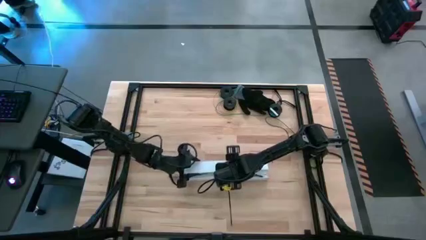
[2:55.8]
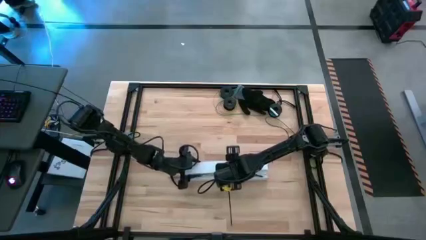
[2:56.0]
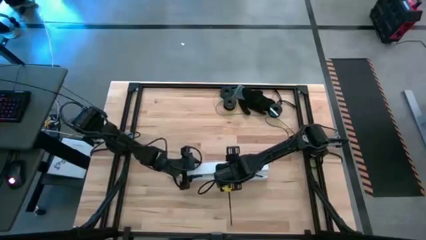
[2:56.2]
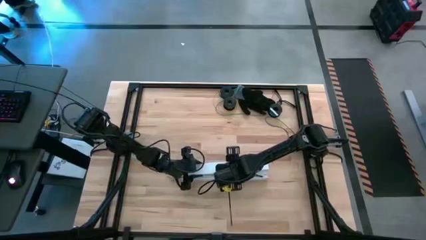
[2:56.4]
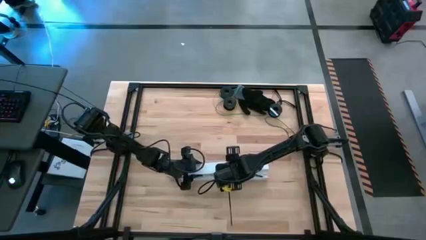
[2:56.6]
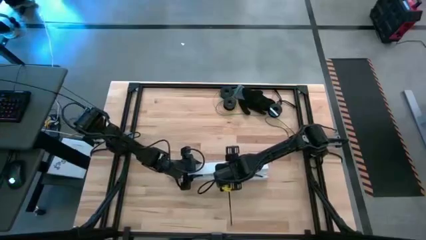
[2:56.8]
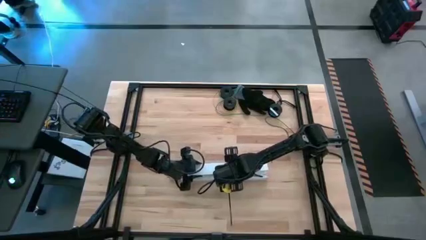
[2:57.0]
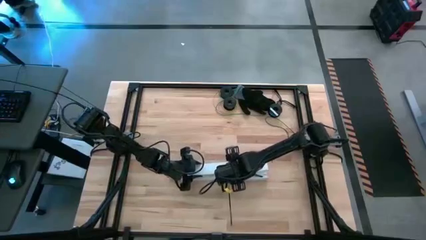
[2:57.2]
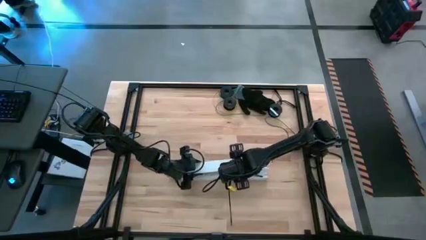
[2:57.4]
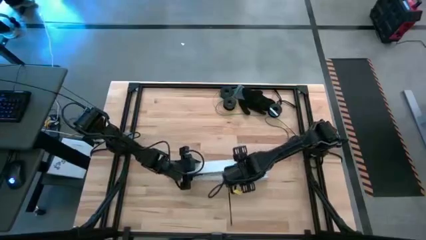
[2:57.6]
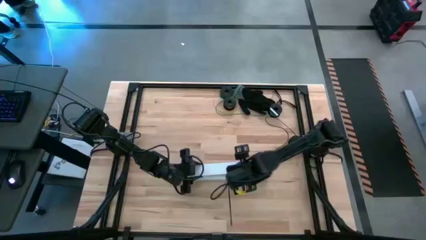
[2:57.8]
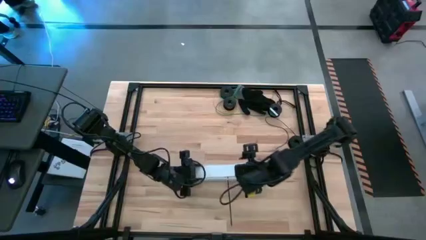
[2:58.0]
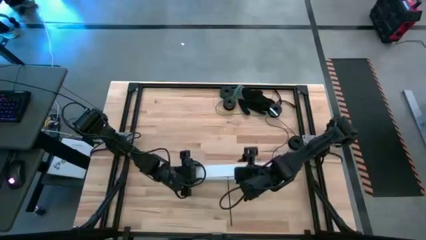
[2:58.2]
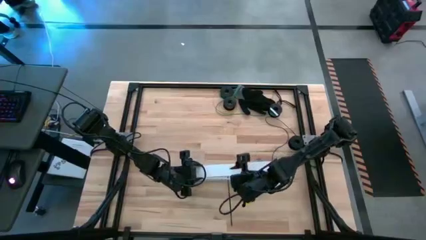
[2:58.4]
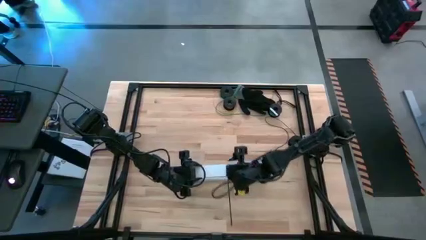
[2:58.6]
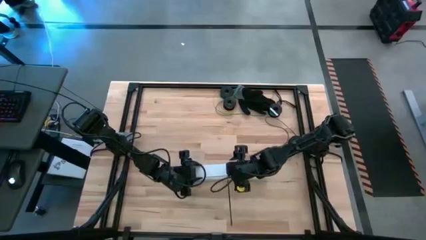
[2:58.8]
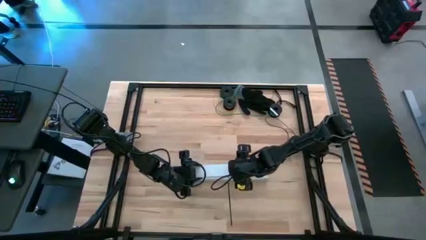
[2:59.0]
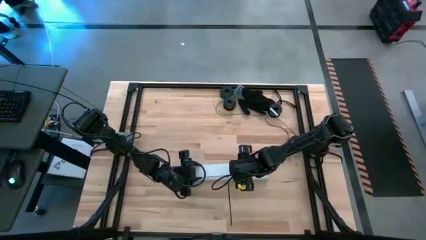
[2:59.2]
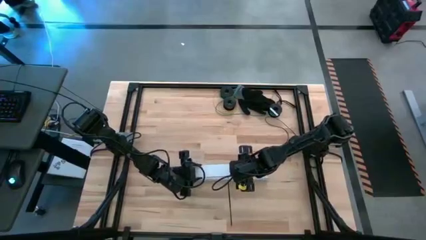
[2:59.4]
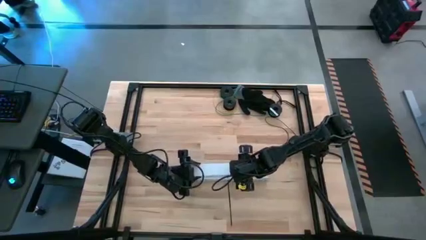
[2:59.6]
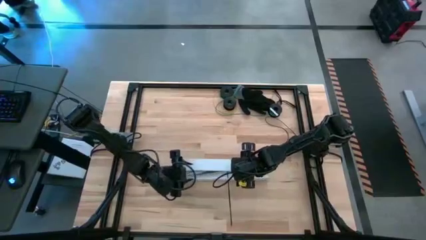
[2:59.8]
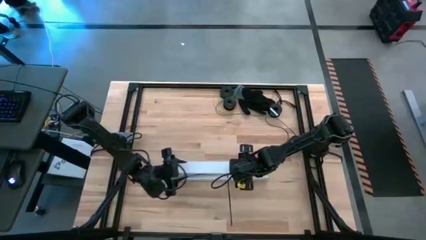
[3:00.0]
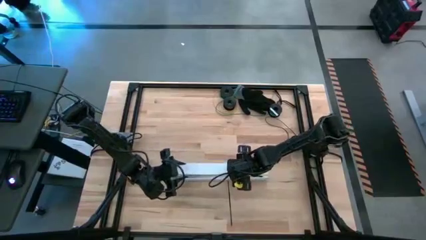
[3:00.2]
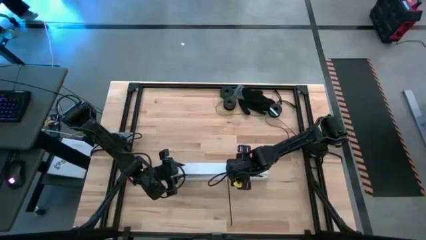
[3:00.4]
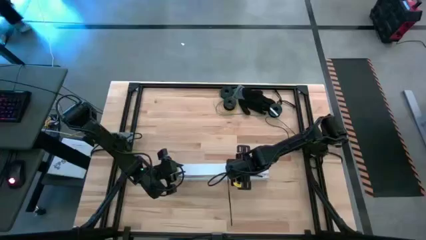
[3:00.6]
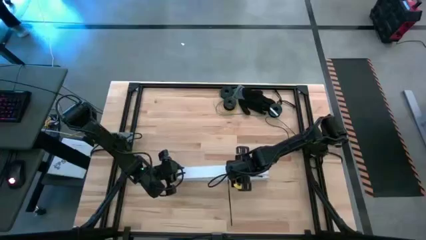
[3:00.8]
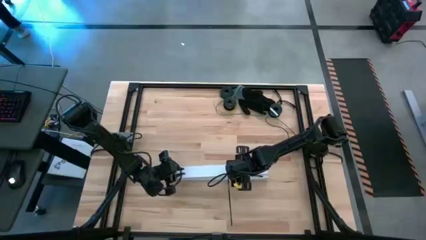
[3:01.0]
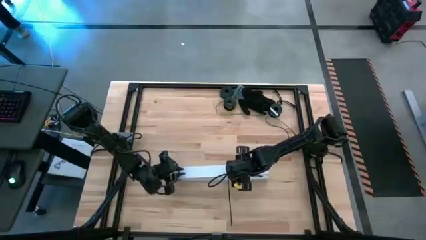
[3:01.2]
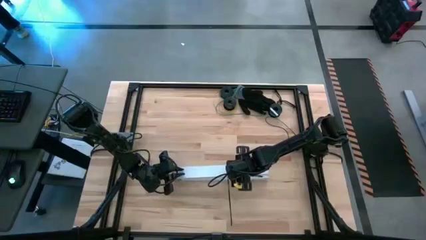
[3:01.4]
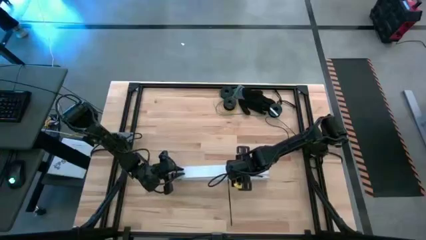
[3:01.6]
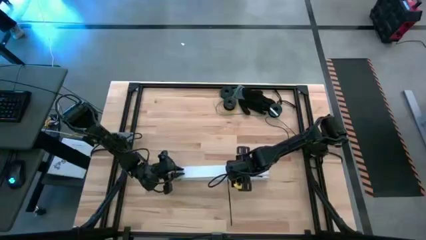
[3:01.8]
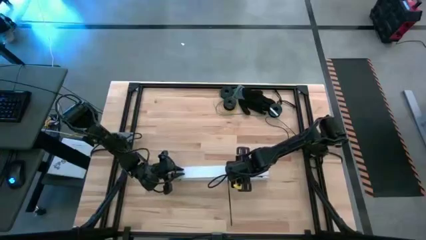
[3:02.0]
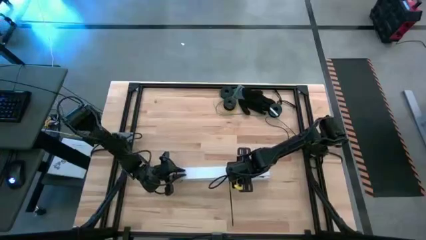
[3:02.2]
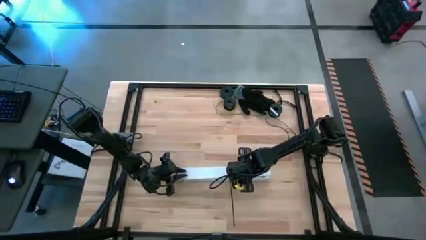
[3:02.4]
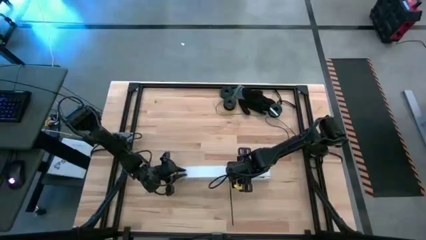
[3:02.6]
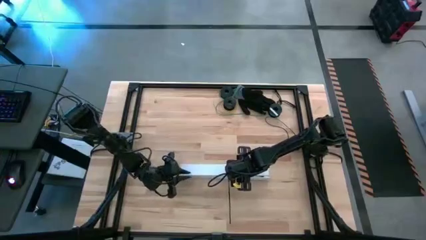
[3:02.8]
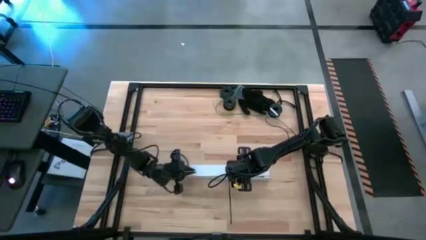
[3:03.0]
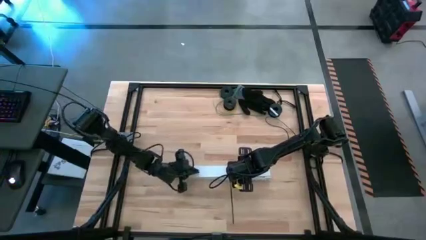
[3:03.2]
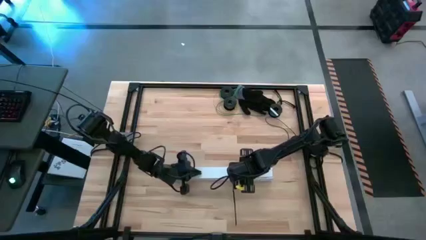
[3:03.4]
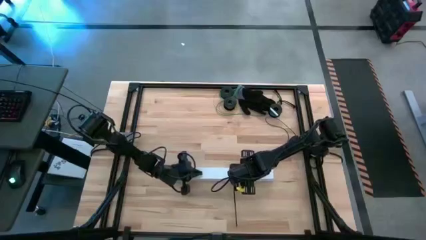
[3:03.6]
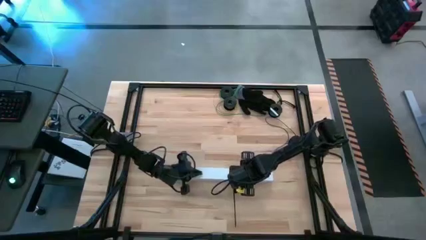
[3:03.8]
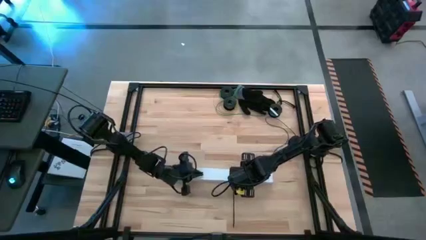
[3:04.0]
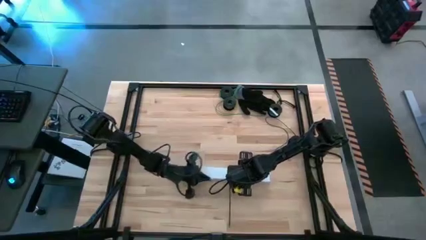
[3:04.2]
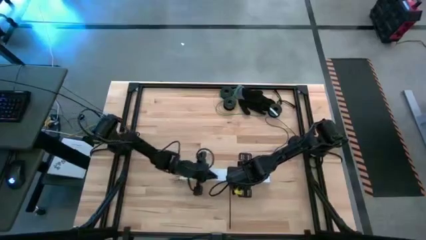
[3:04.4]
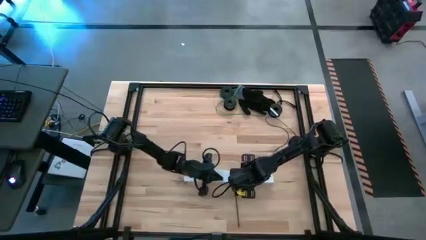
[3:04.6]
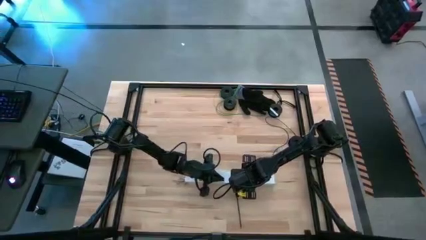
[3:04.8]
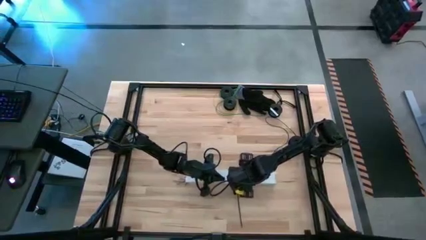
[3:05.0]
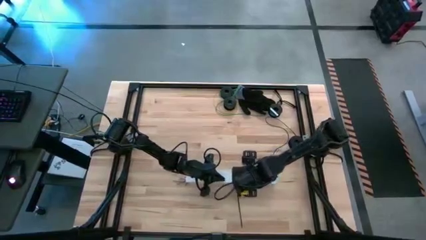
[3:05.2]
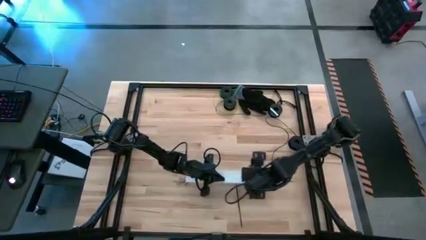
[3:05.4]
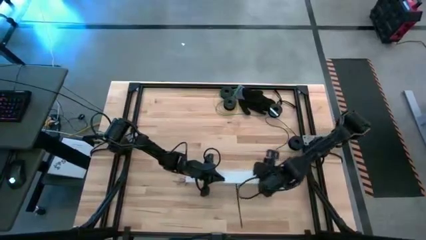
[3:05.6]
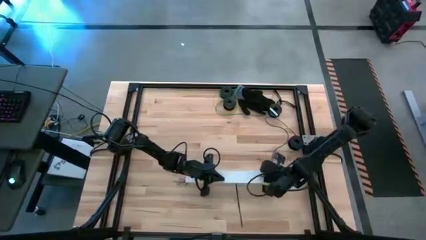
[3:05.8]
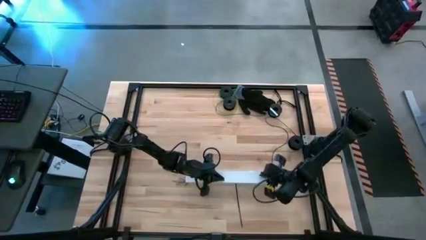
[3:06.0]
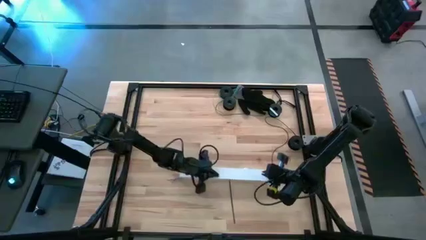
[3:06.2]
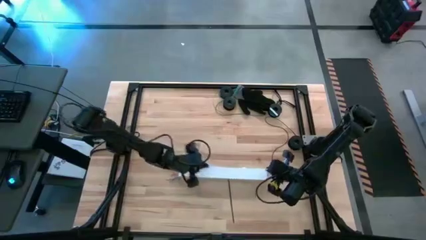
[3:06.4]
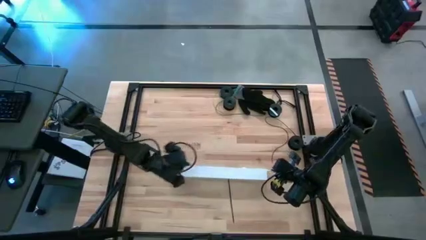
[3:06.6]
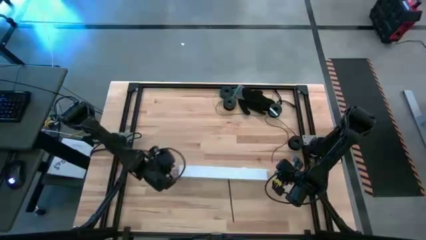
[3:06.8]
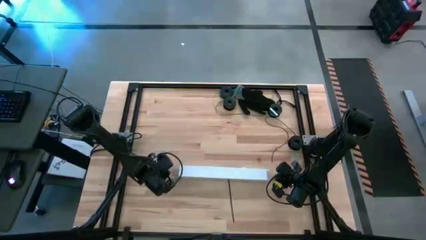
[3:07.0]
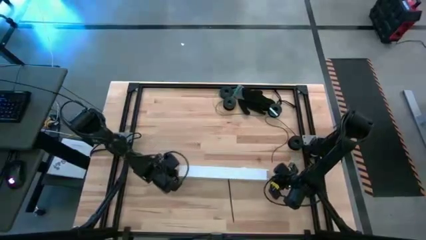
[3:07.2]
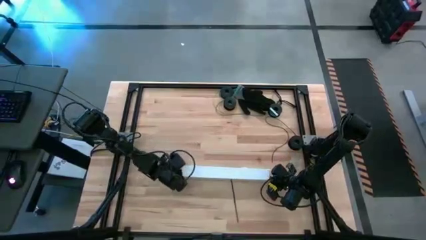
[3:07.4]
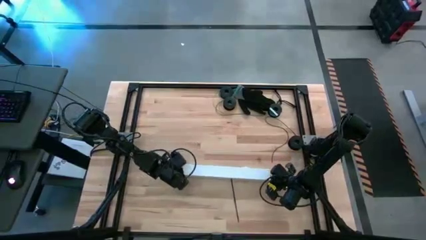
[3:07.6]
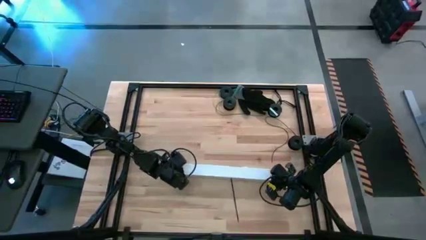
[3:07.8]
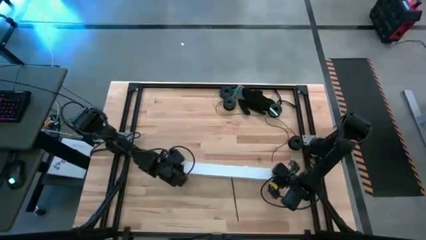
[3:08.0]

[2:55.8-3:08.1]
Task: Ziptie cables
Close the white cable duct

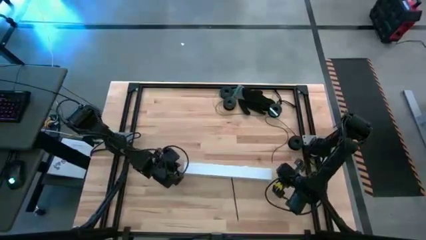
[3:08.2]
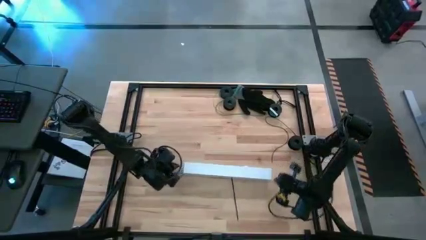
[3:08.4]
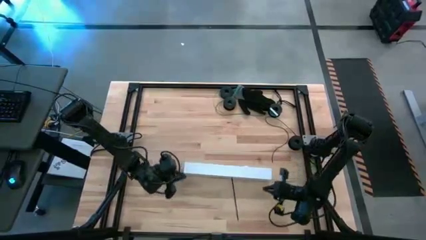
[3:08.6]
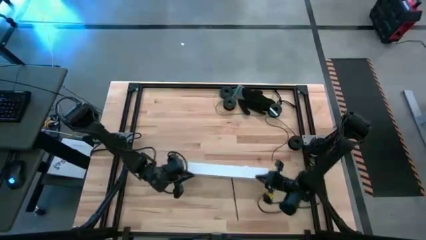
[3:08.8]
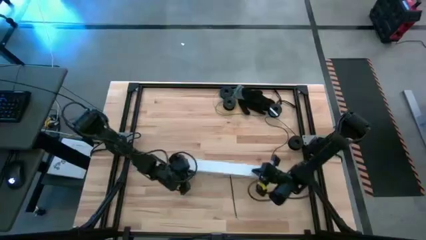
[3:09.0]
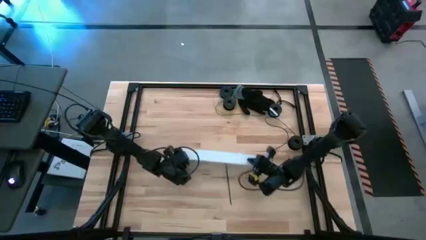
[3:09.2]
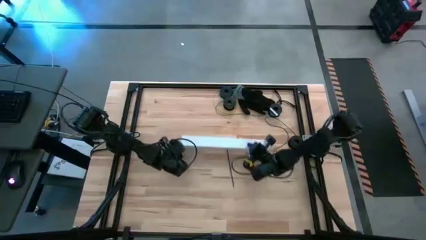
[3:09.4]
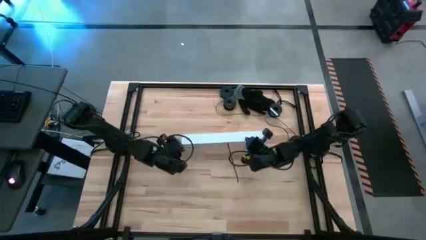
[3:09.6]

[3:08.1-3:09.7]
Move the white cable duct to the center of the table

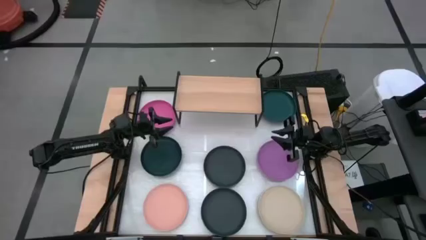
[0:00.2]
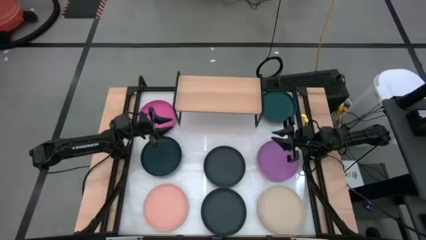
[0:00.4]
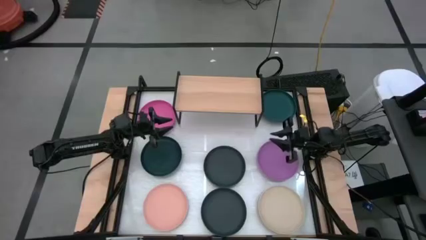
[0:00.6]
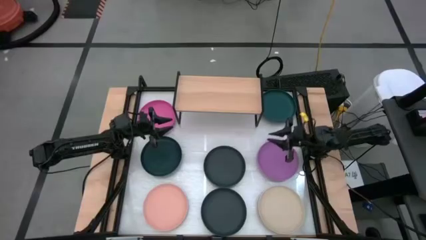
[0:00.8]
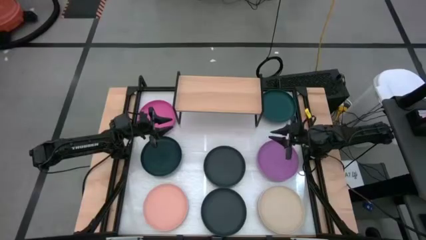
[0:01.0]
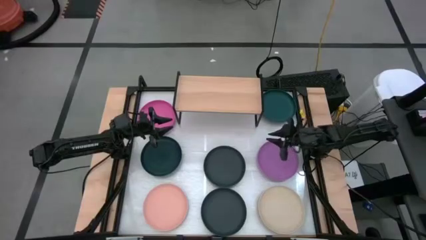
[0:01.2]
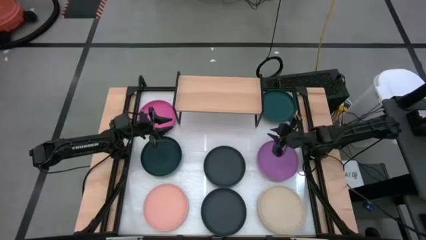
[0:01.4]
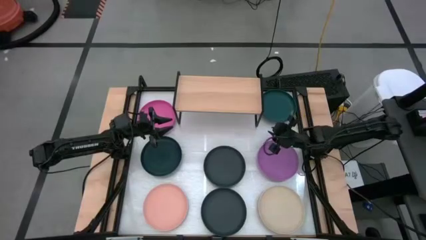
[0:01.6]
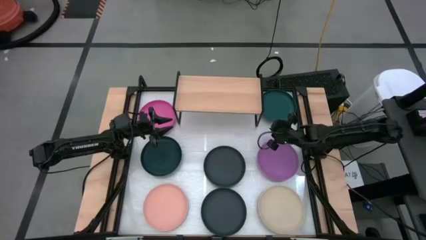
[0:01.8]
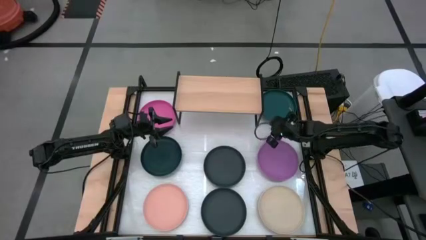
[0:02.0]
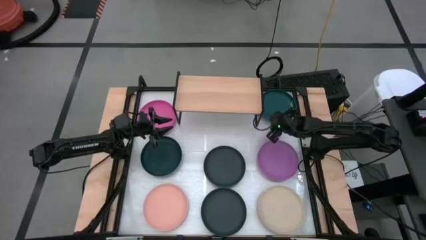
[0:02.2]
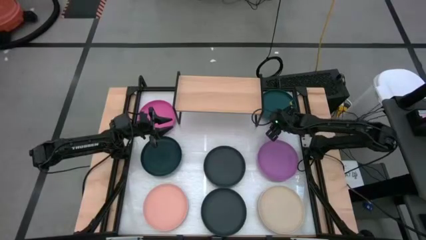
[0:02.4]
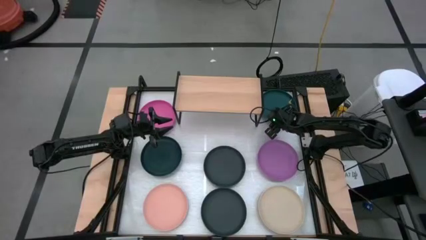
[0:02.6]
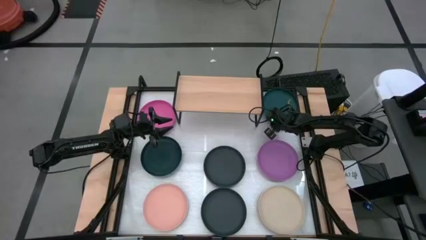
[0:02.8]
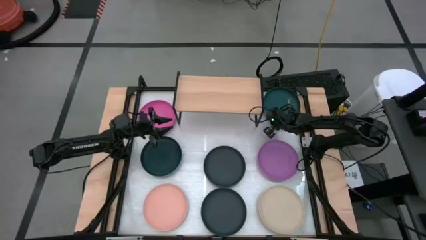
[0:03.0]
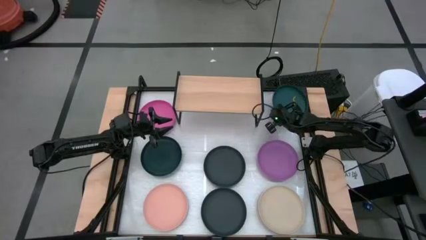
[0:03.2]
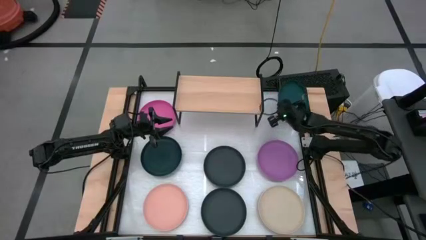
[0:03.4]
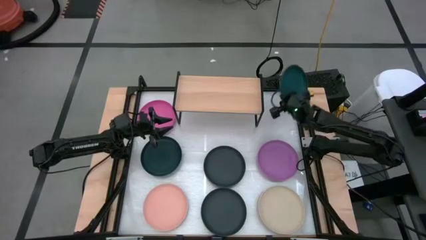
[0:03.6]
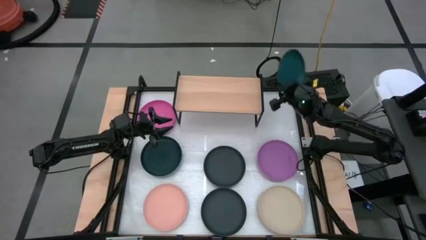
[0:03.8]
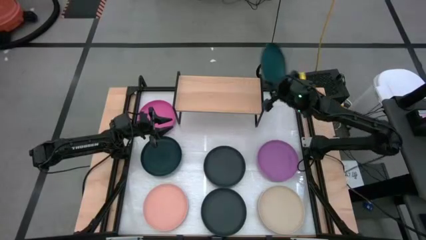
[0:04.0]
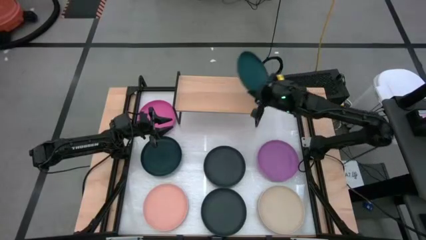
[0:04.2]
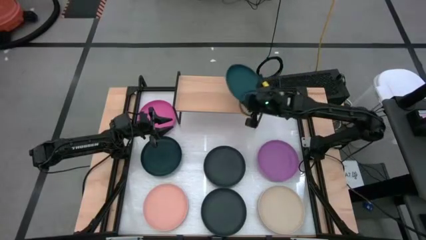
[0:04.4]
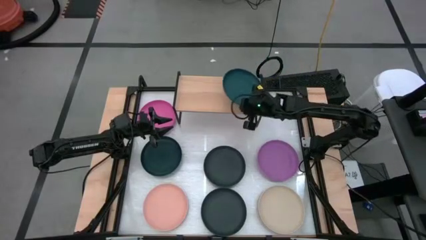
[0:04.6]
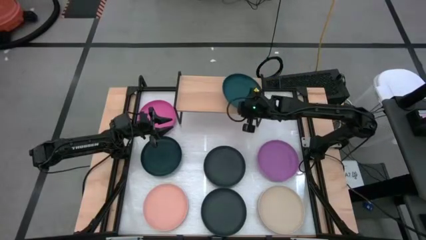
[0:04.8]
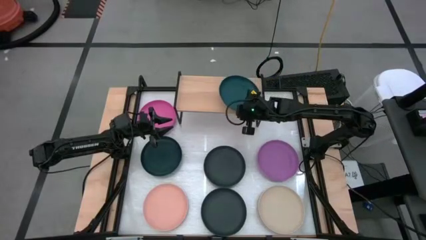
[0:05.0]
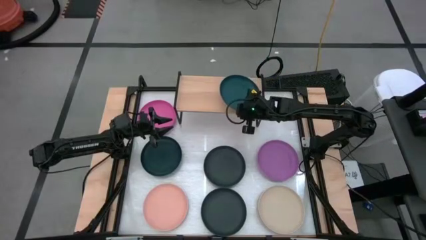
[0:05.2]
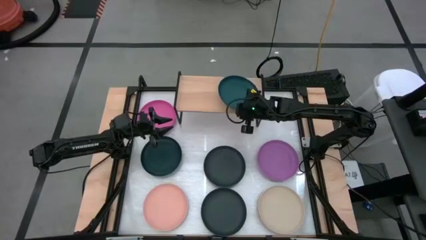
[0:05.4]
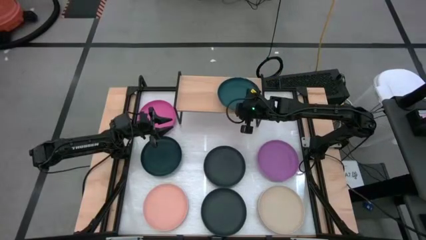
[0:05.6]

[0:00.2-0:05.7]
Task: Place and stack plates onto a shelf
Put the right green plate on the shelf
